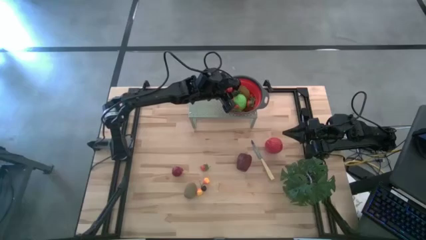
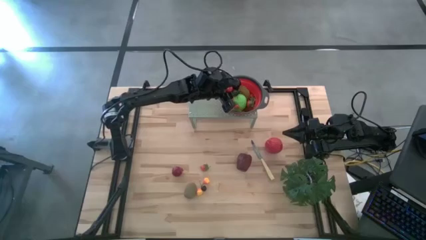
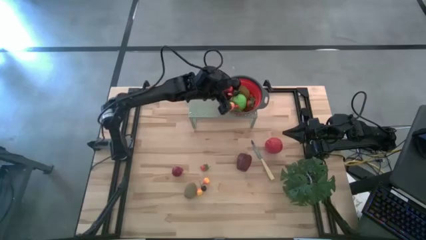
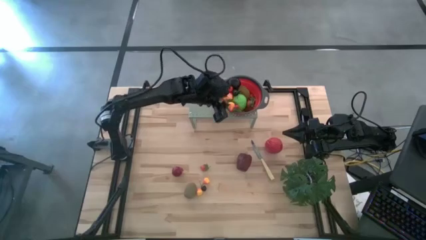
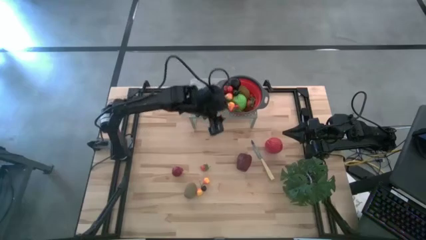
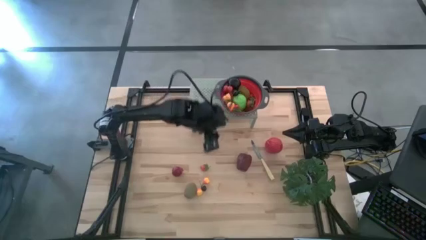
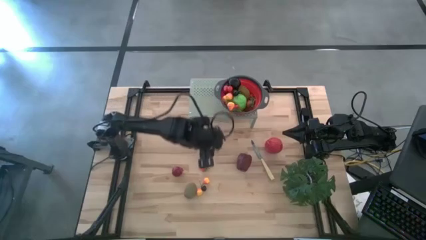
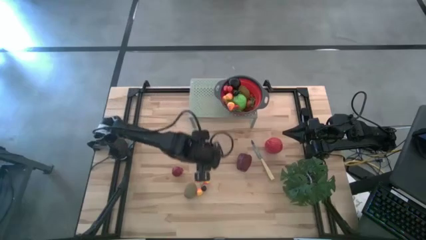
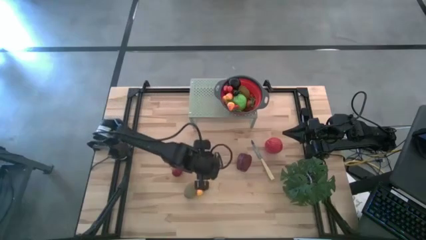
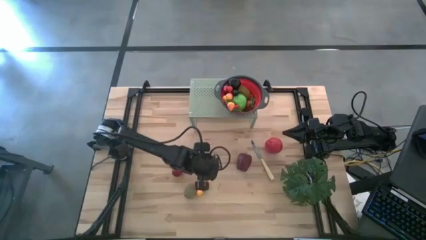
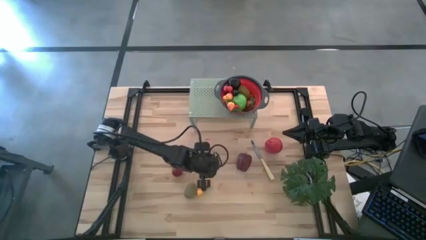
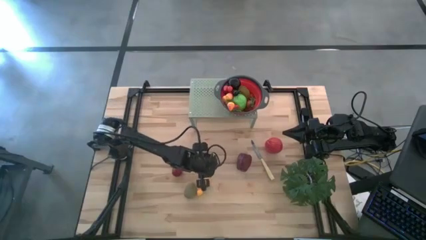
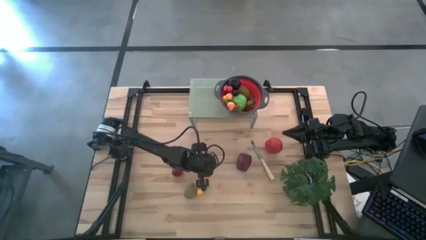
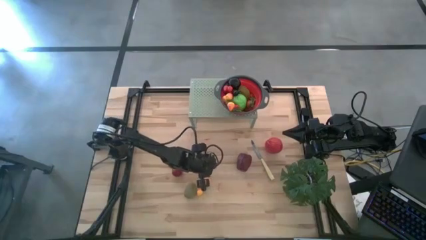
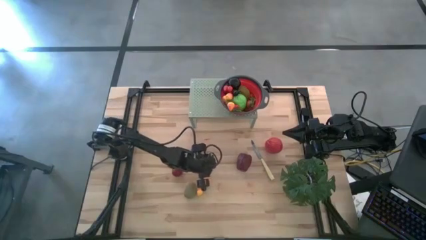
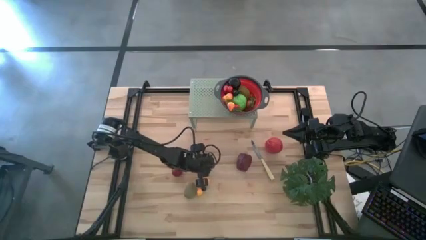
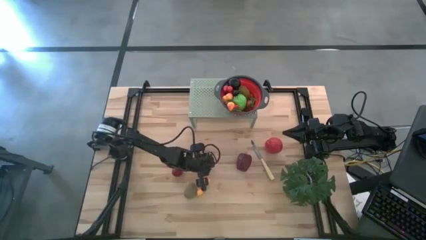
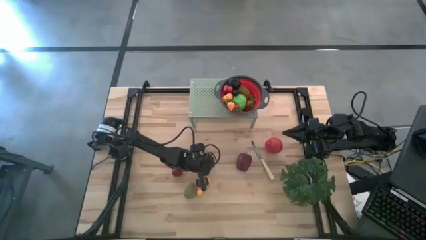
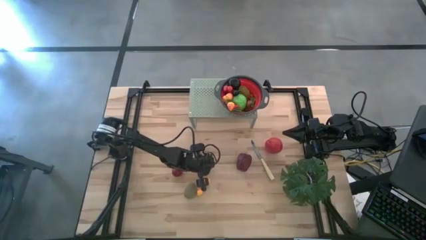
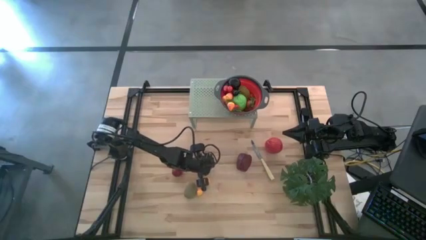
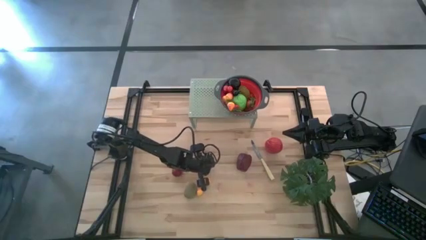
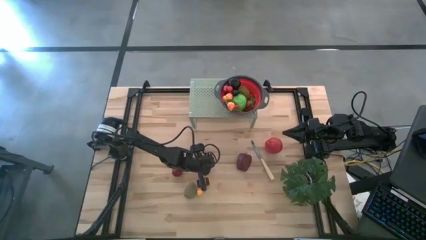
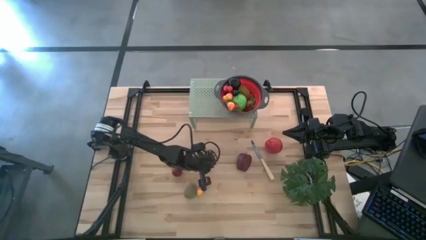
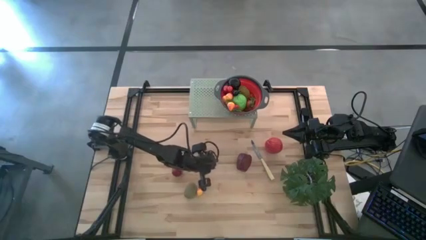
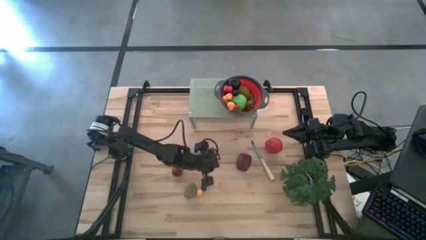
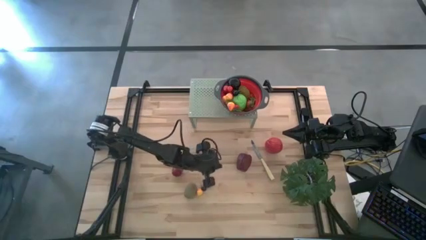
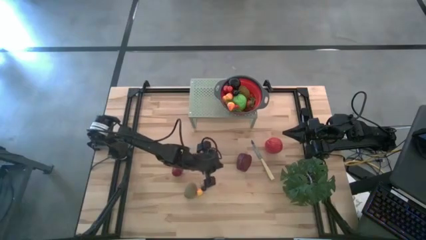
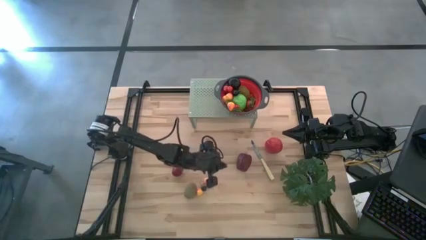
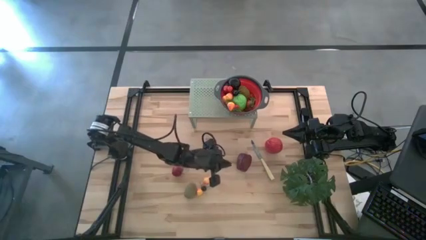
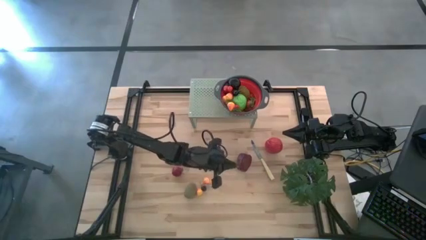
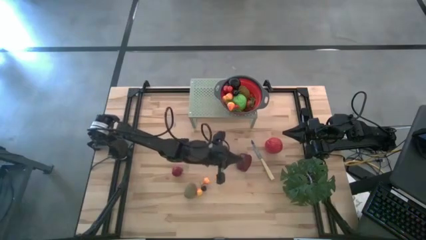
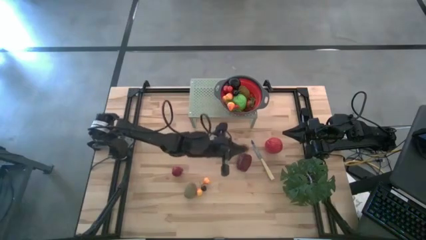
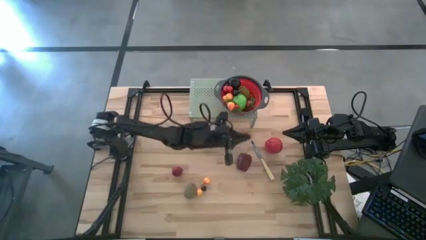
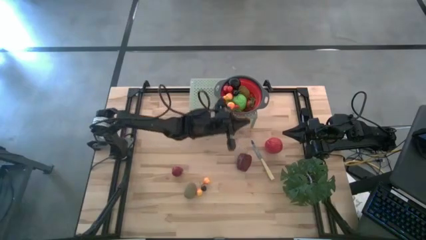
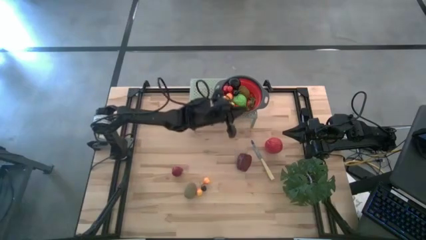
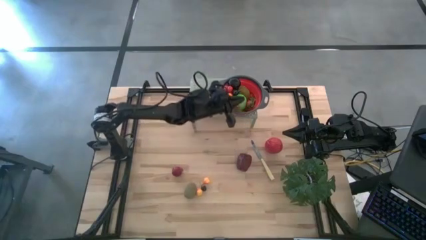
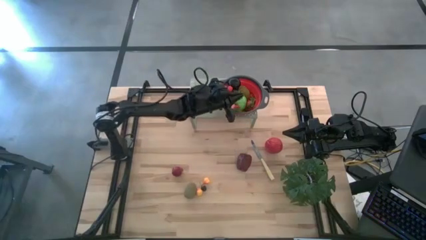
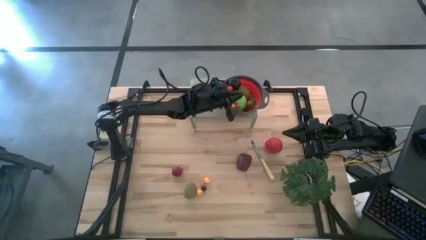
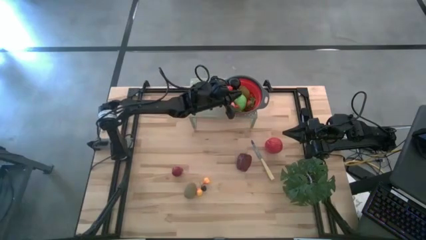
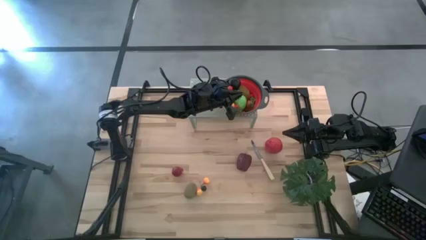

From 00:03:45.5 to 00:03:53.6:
Task: Pick & Place Fruit
Put the red strawberry into the black strainer bowl on the shelf

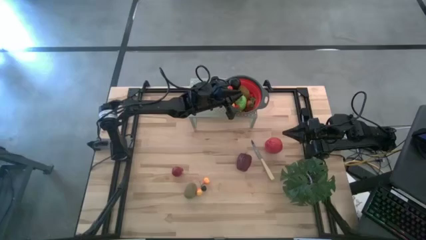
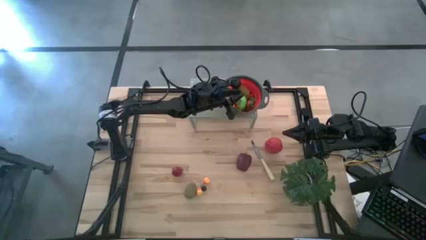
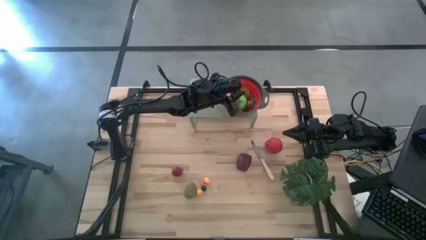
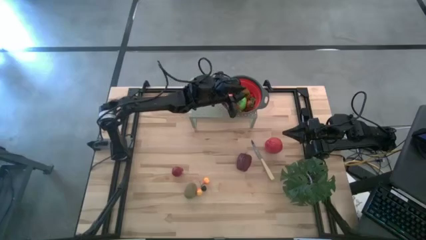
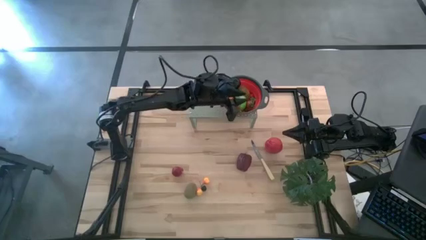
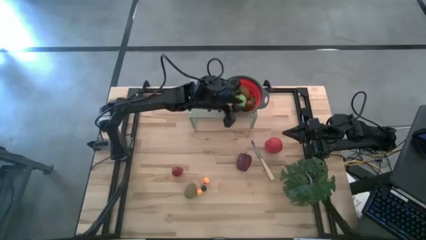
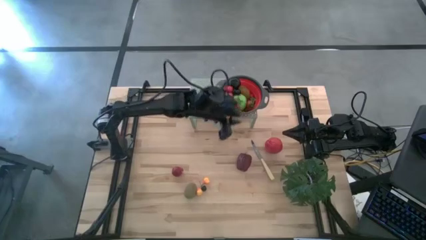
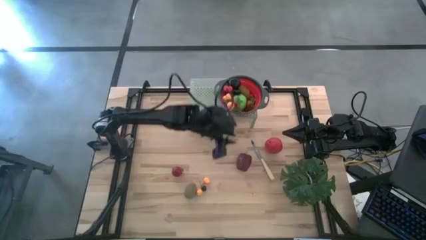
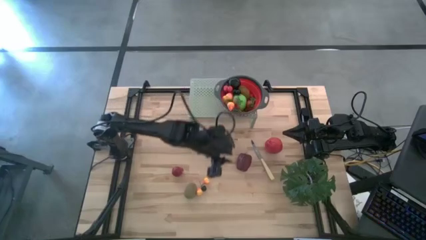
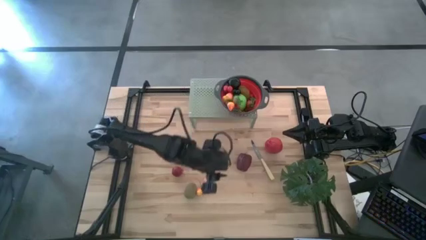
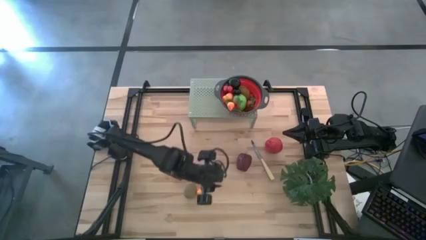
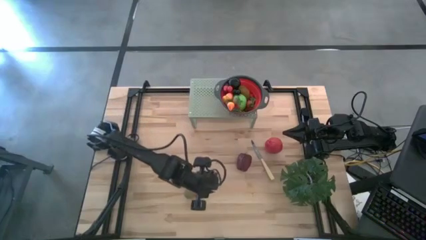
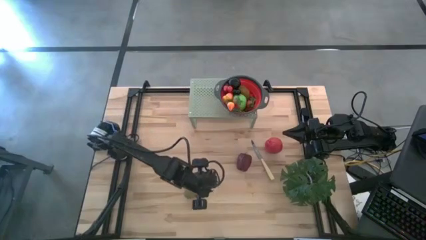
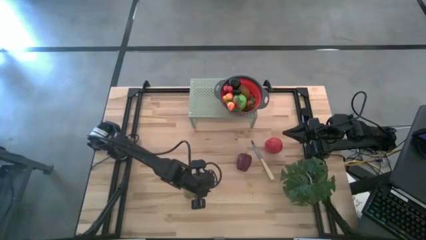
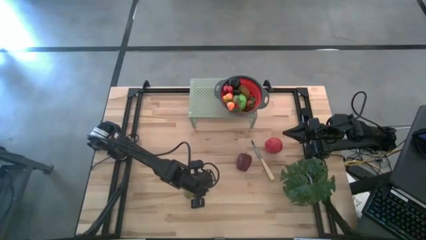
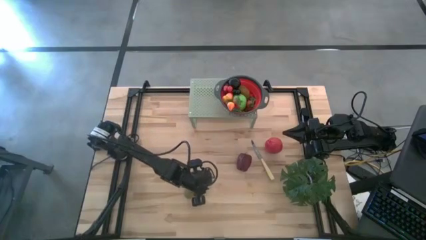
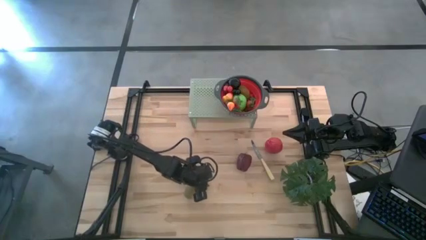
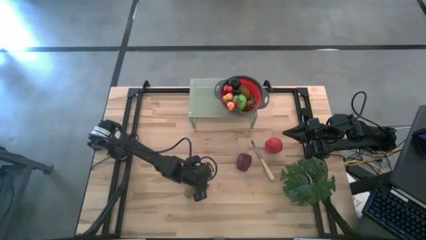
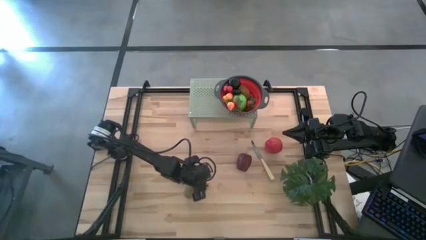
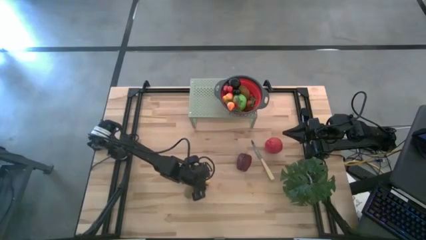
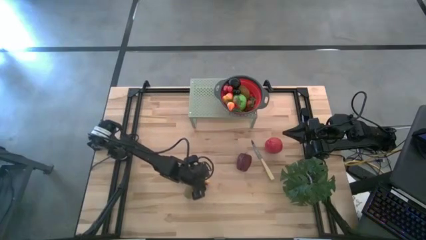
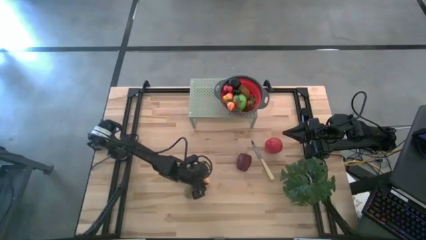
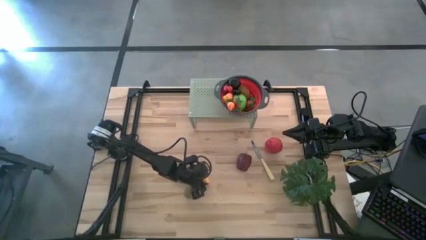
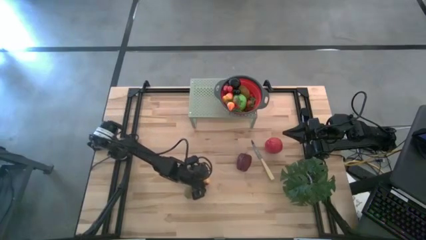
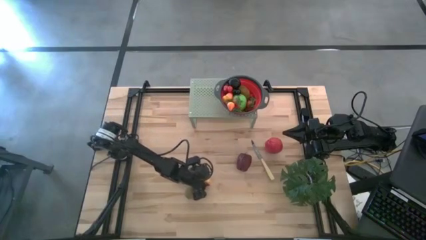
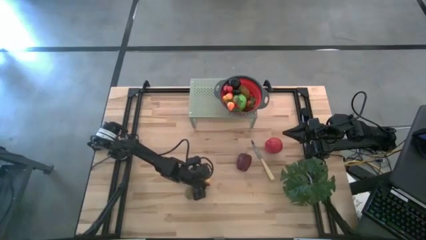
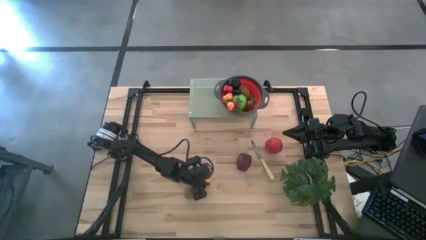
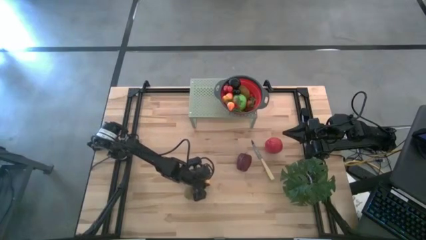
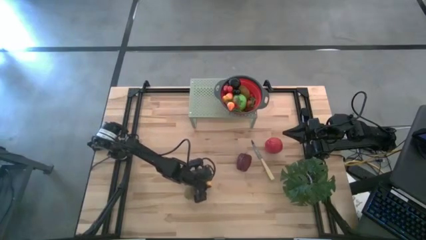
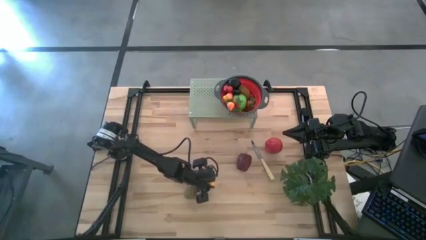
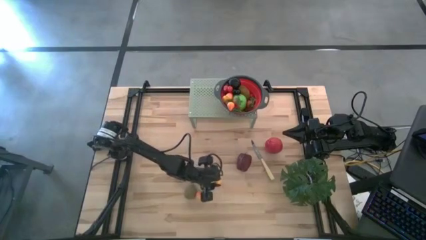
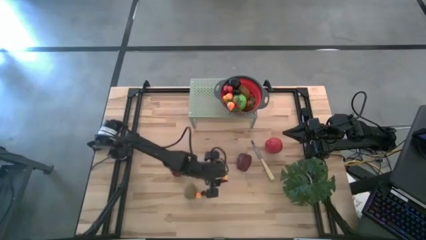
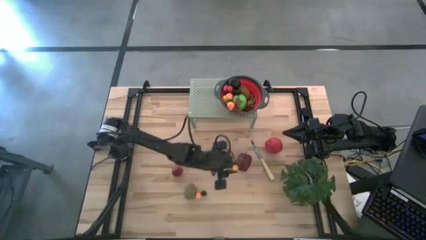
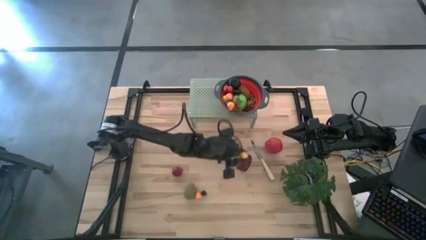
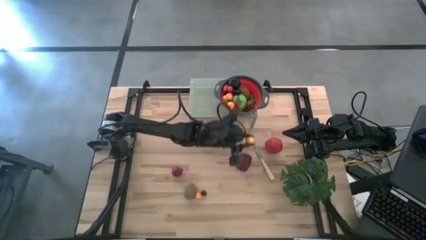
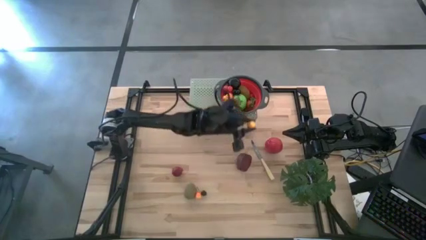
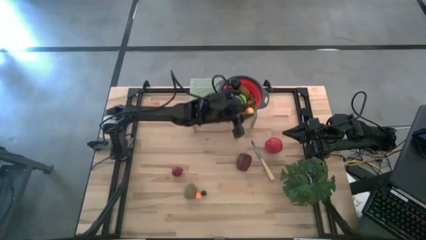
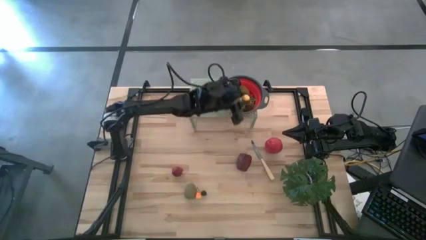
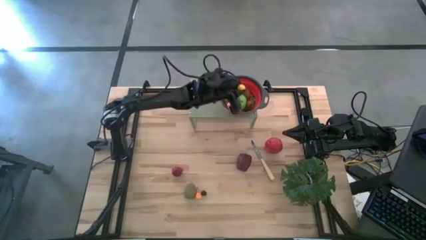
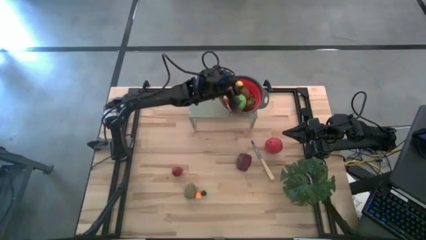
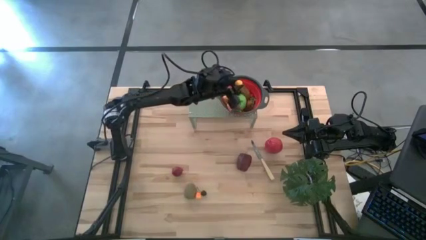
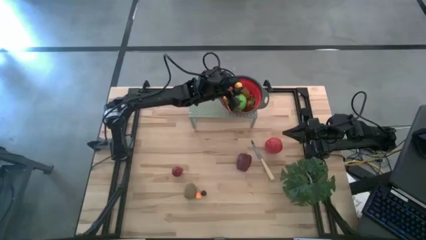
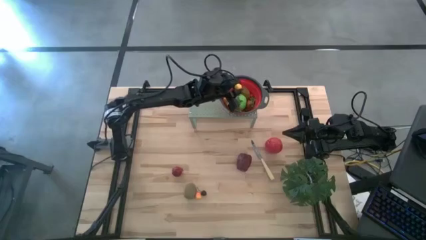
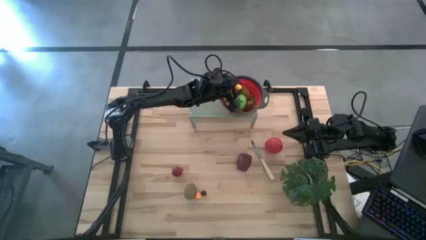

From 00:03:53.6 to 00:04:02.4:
Put the orange peach into the black strainer bowl on the shelf
